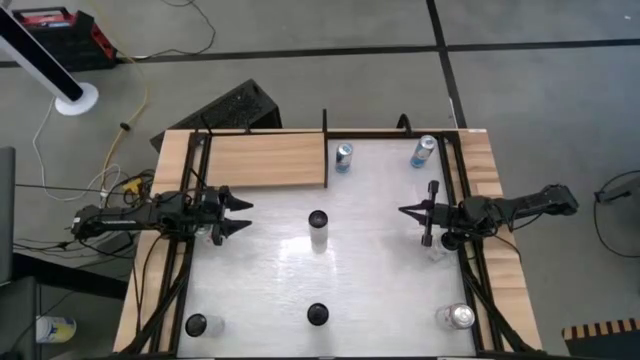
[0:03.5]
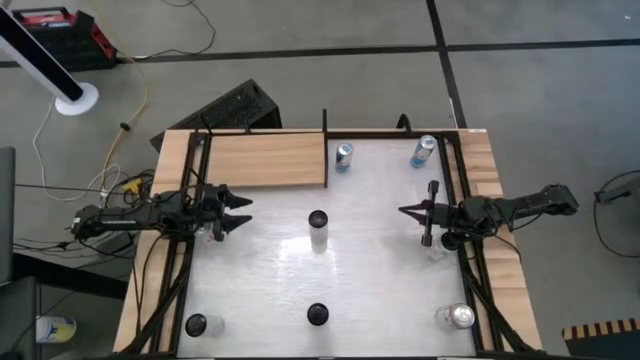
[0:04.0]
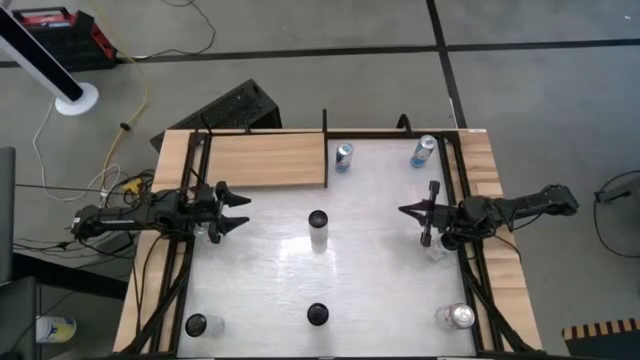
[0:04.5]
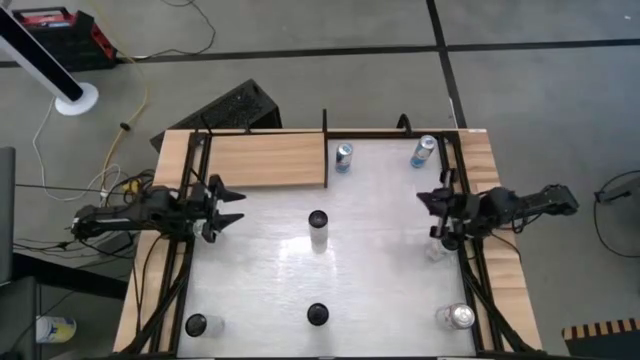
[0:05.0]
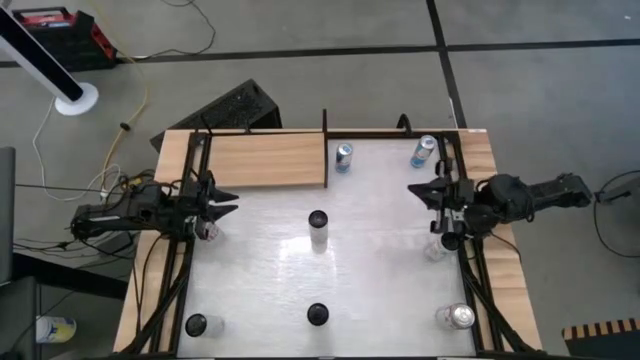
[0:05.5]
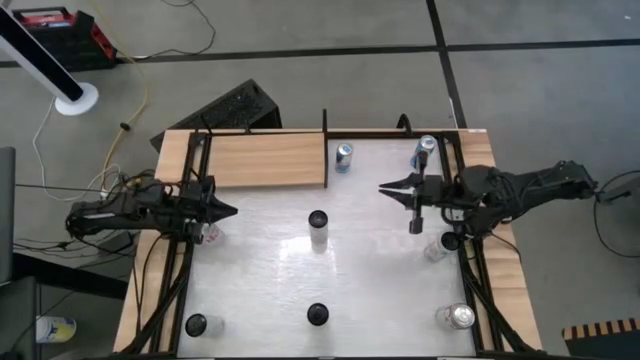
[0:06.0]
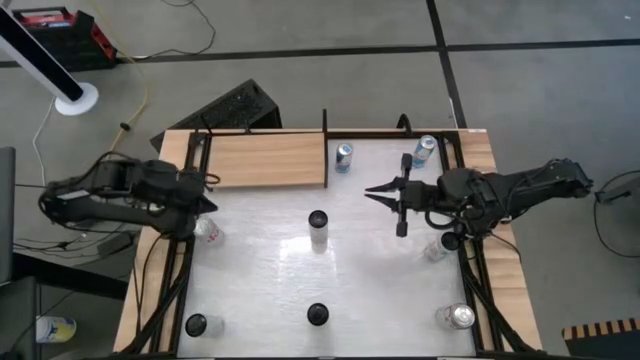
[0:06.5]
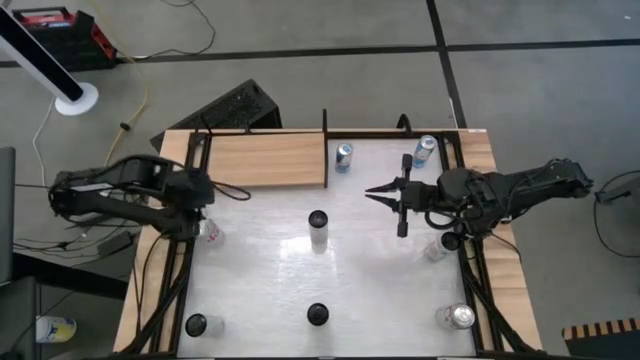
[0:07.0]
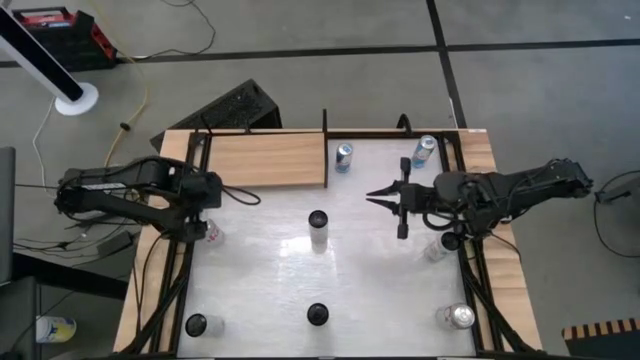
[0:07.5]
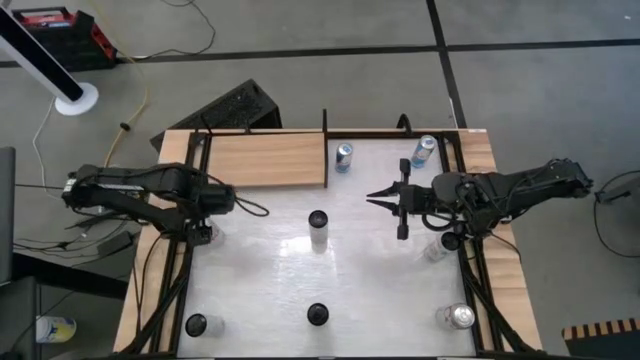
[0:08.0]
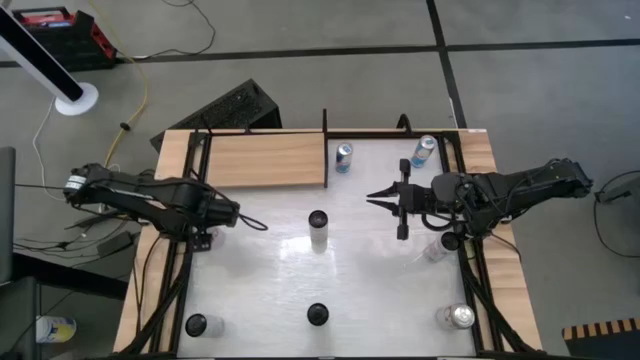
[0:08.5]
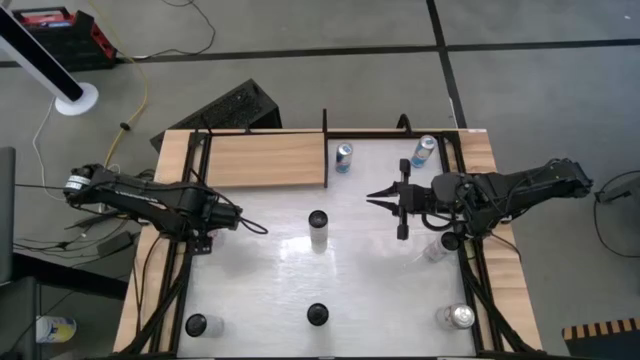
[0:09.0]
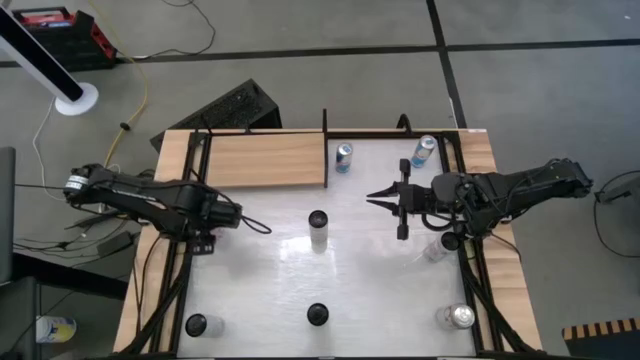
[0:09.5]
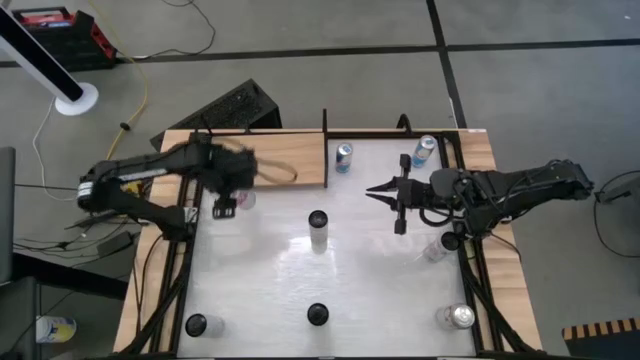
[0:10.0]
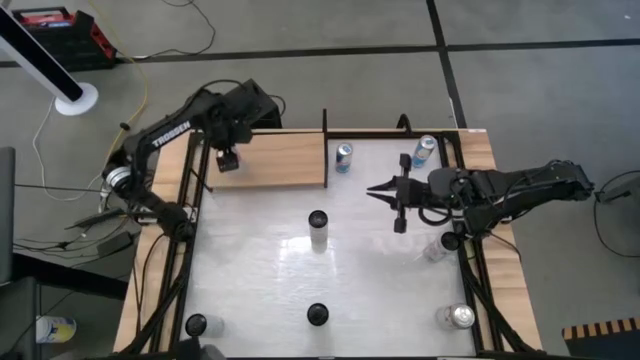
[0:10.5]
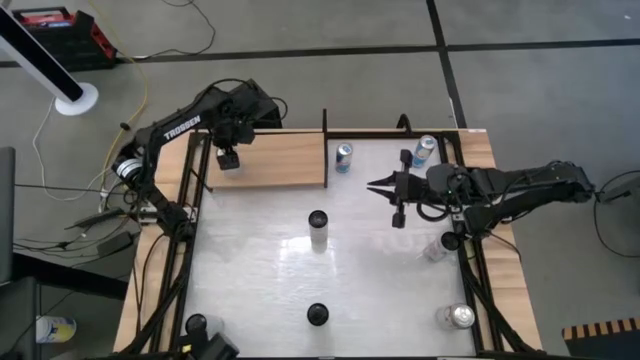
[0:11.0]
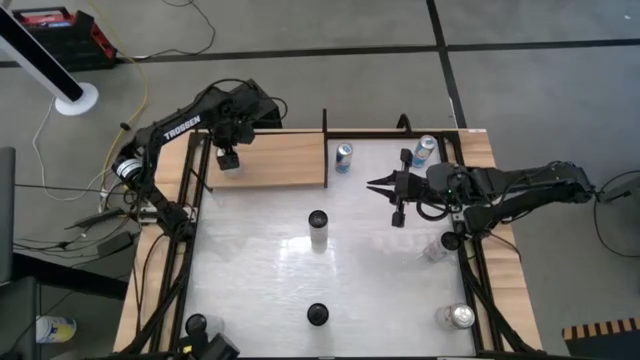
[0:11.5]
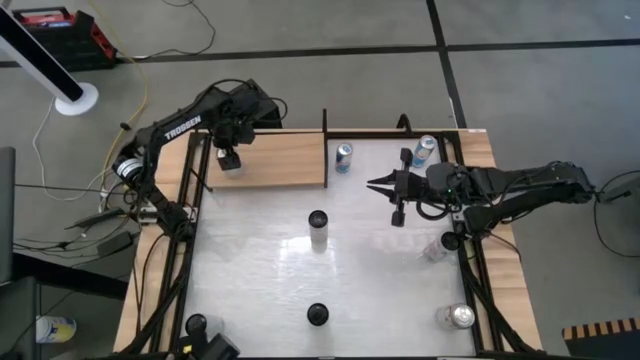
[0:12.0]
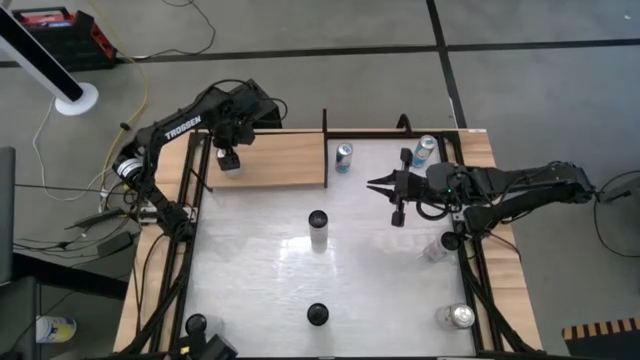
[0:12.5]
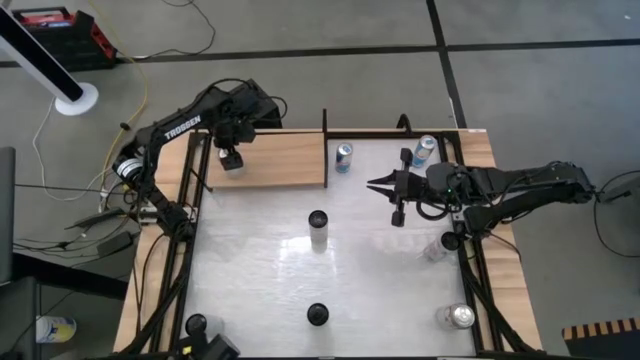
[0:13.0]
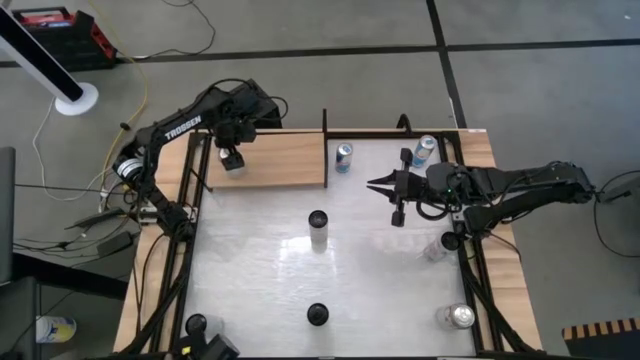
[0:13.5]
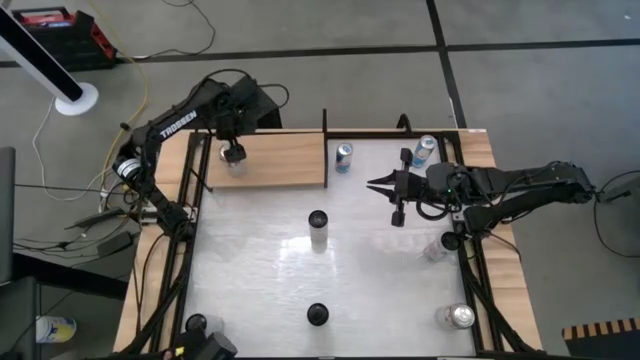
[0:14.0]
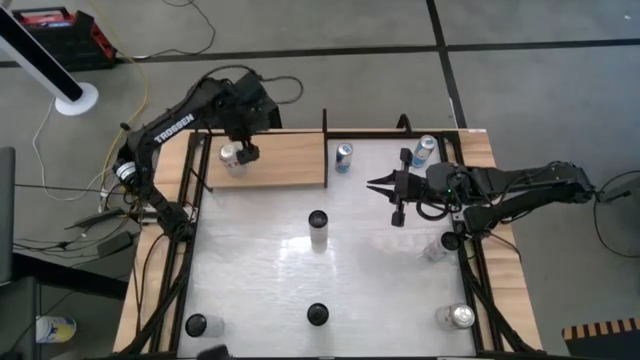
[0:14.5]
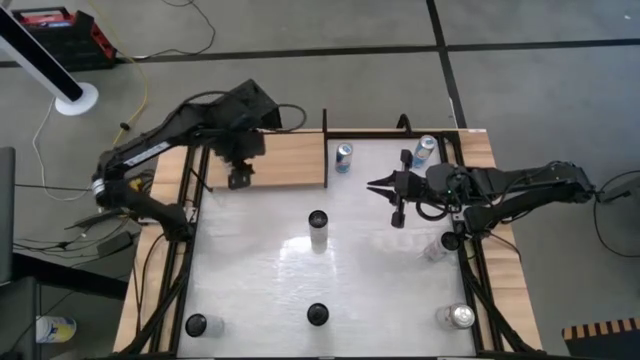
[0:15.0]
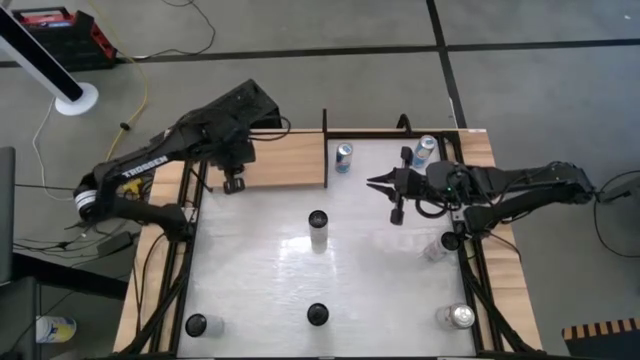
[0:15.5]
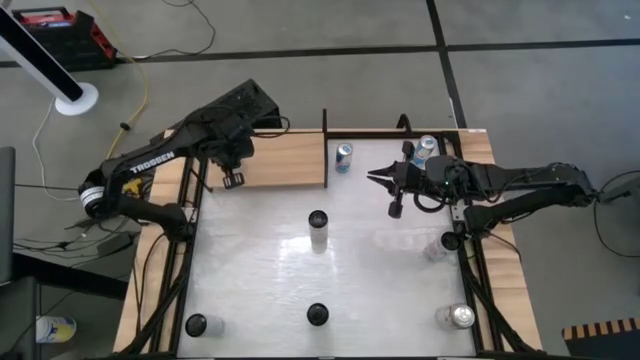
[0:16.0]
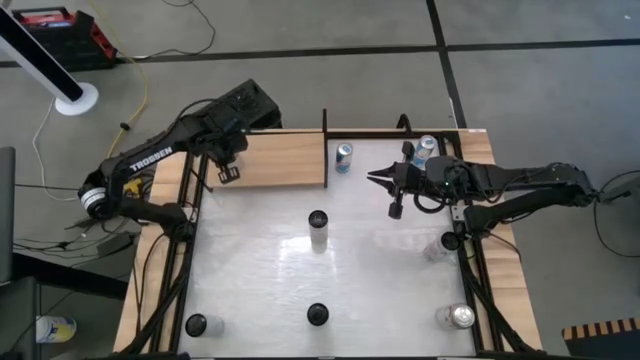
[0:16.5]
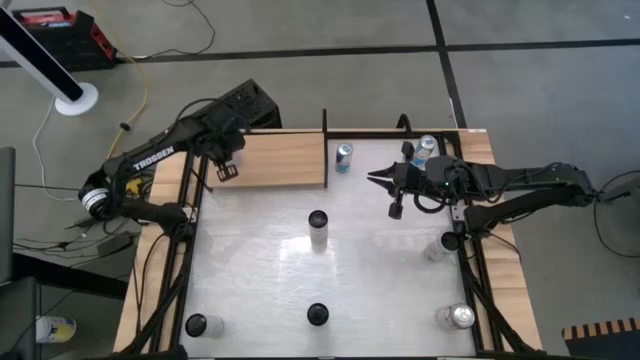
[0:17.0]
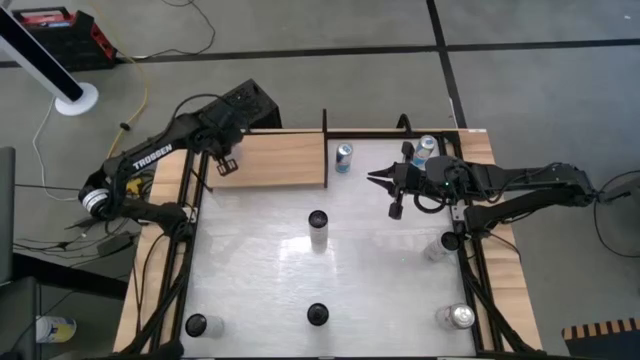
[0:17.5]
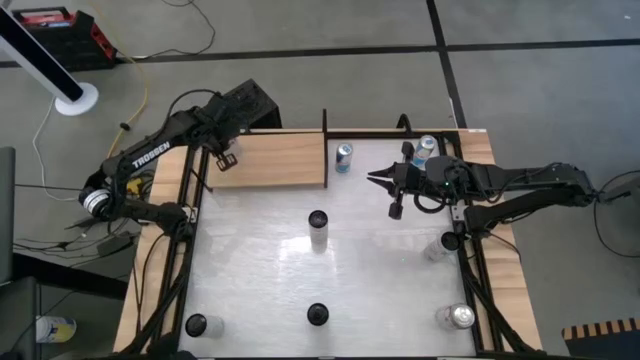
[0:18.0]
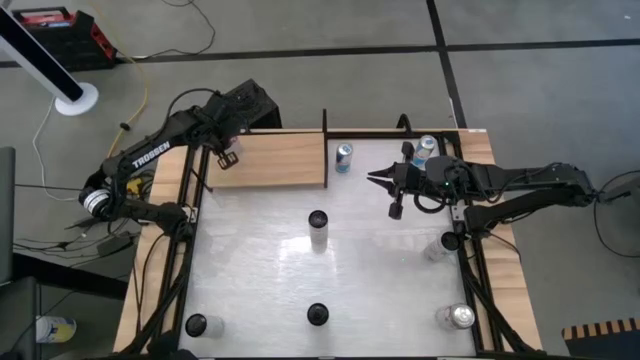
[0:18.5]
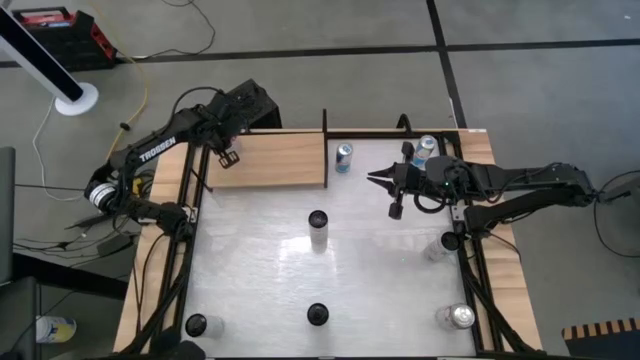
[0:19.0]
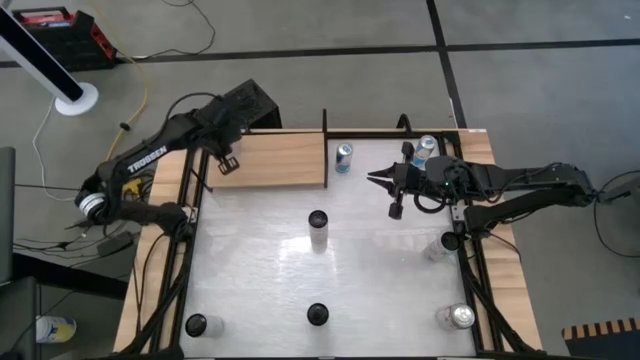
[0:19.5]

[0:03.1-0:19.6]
Task: Place canned beverage on shelf
Put the left red and silver soda can on the shelf

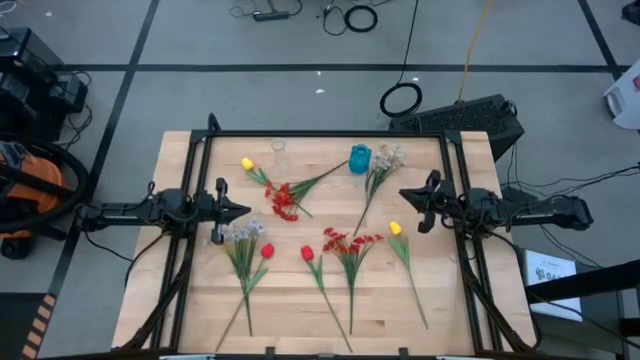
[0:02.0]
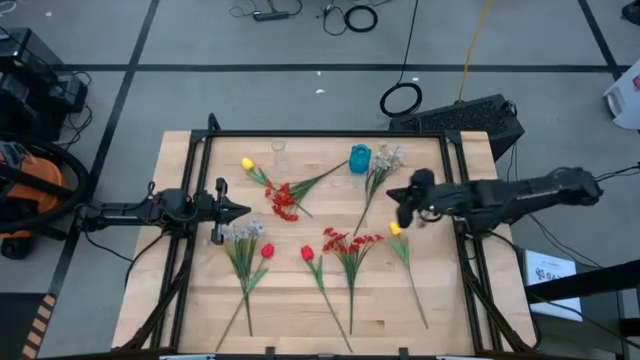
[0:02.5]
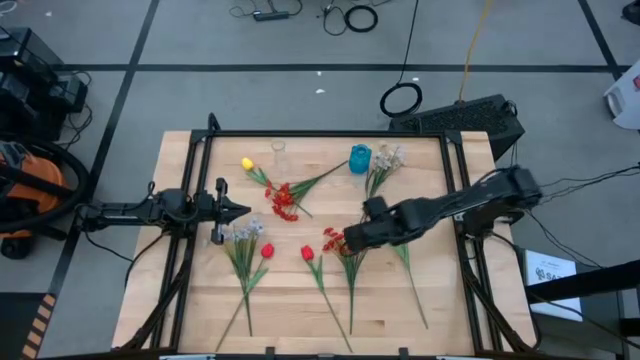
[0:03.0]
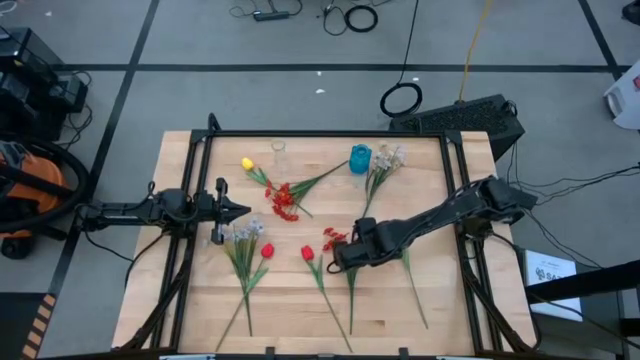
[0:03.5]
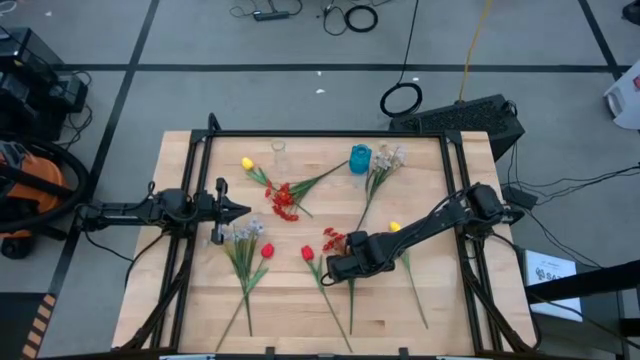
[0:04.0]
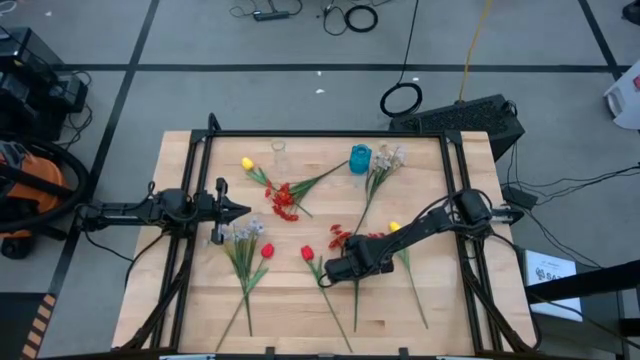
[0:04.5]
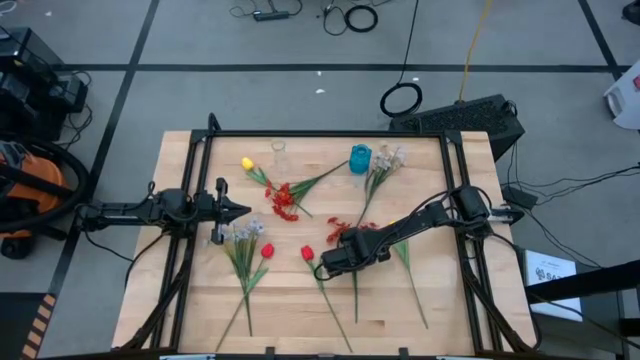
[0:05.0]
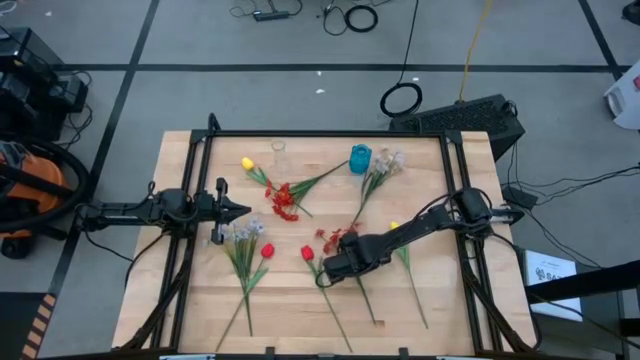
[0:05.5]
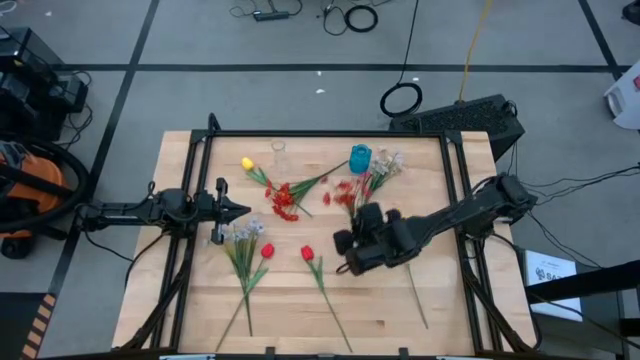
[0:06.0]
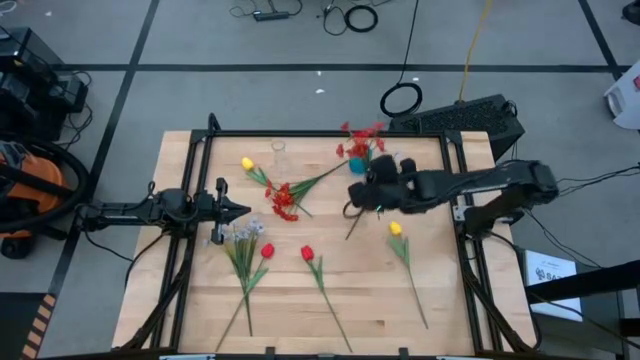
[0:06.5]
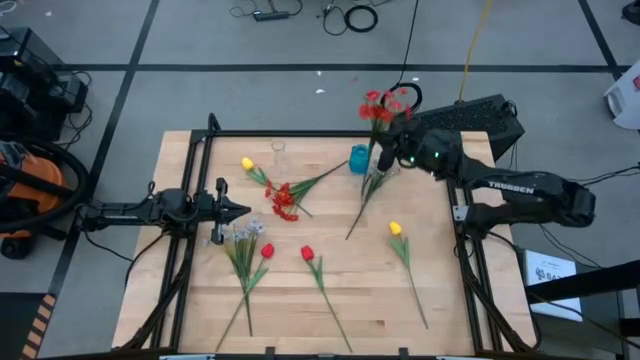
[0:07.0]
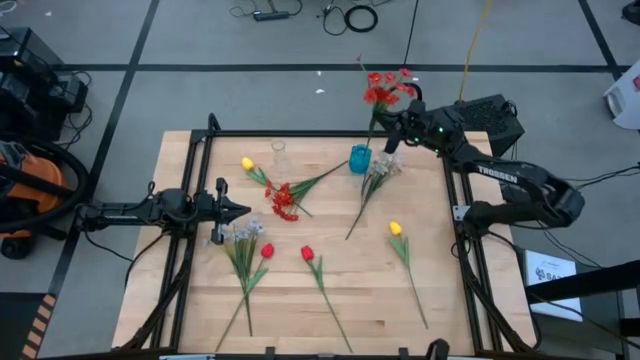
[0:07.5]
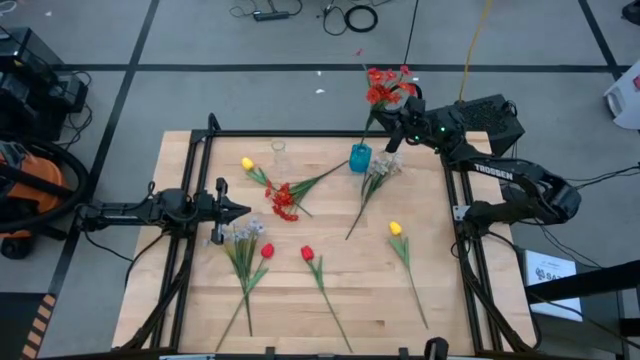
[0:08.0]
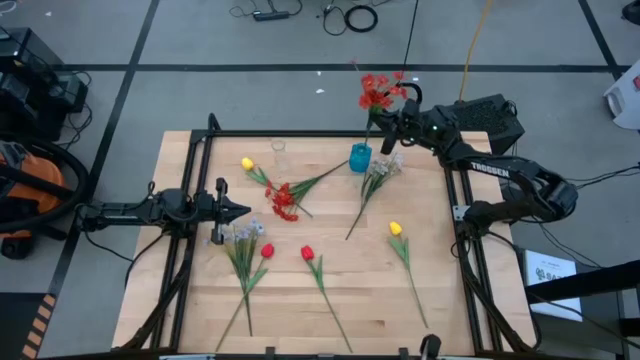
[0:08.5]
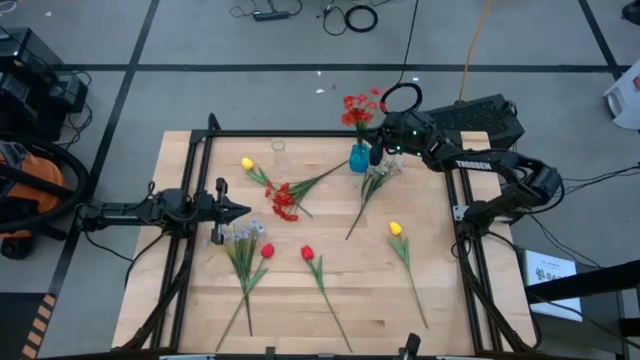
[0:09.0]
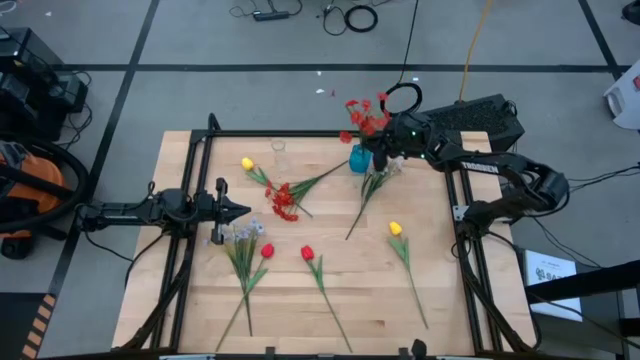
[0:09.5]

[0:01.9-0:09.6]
Task: Sort flowers into vase by color
Put the red flower into the blue vase
